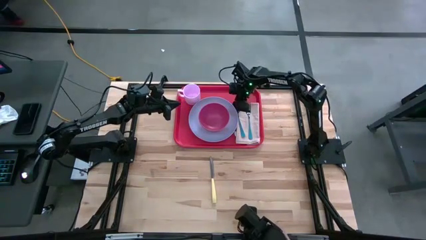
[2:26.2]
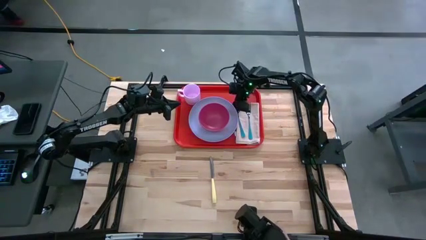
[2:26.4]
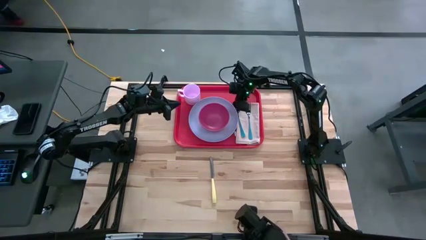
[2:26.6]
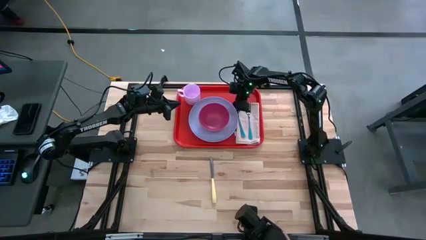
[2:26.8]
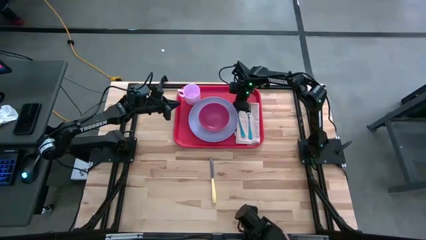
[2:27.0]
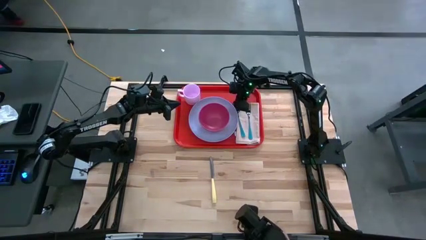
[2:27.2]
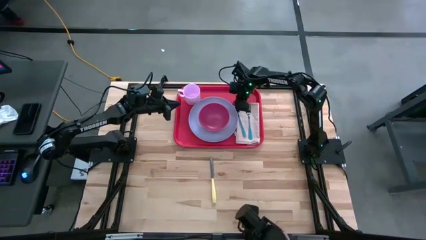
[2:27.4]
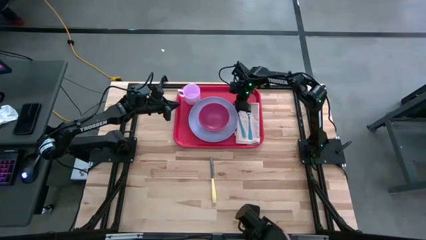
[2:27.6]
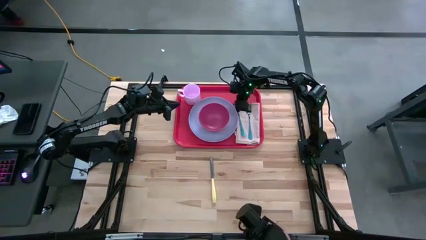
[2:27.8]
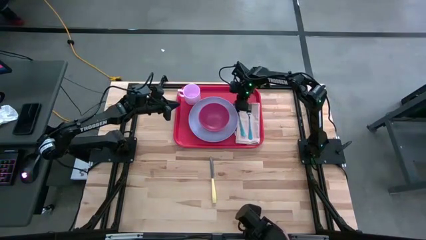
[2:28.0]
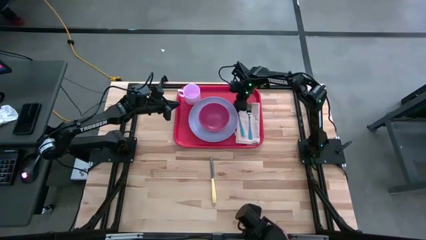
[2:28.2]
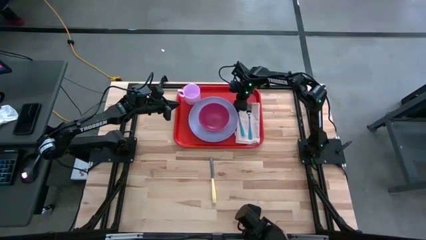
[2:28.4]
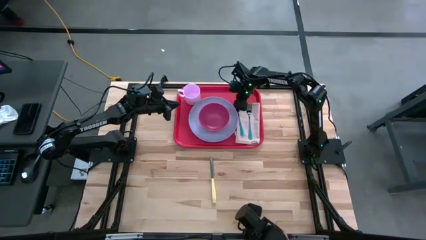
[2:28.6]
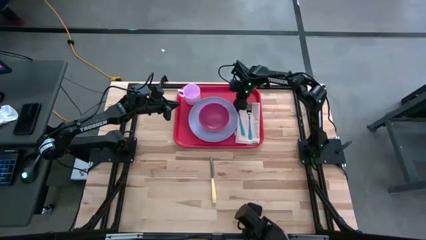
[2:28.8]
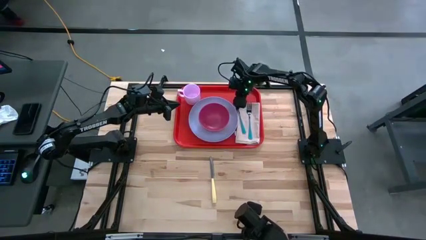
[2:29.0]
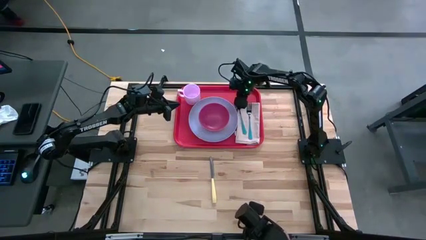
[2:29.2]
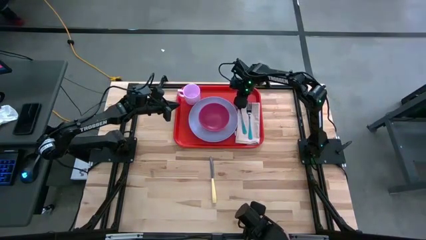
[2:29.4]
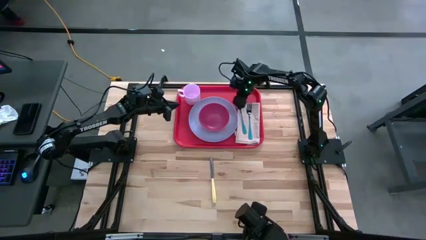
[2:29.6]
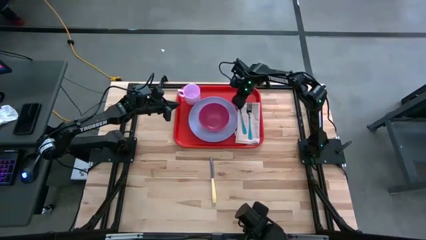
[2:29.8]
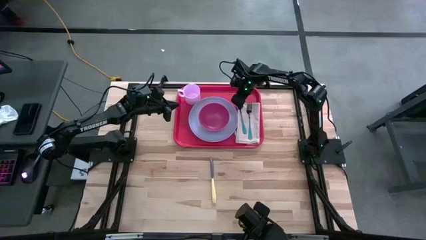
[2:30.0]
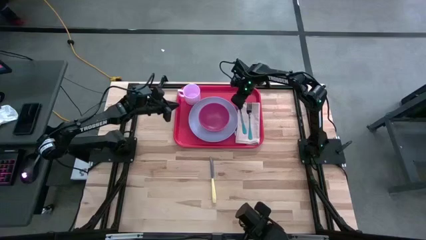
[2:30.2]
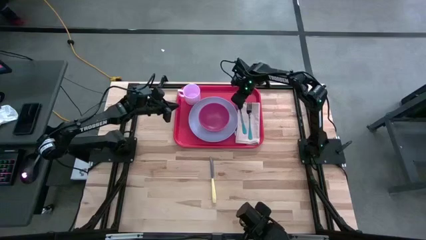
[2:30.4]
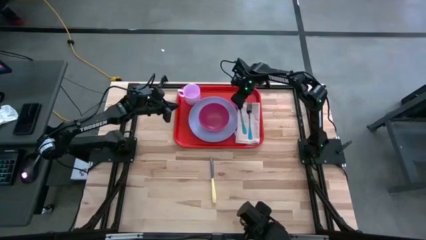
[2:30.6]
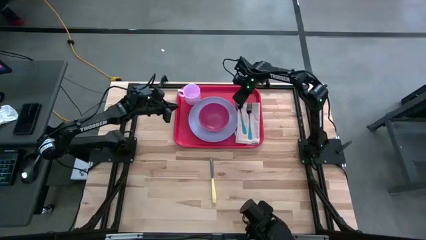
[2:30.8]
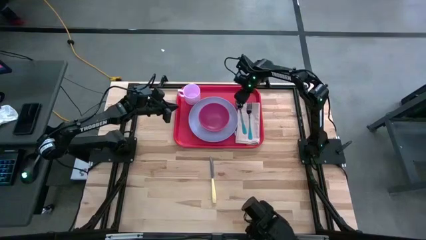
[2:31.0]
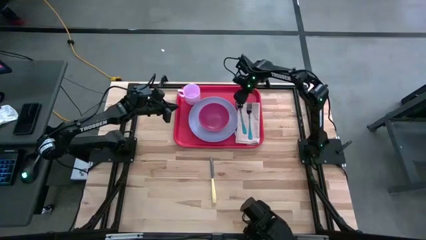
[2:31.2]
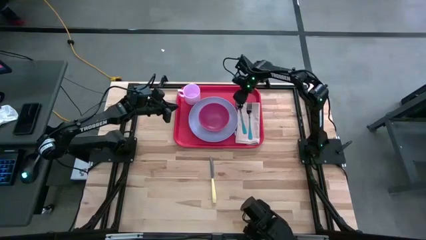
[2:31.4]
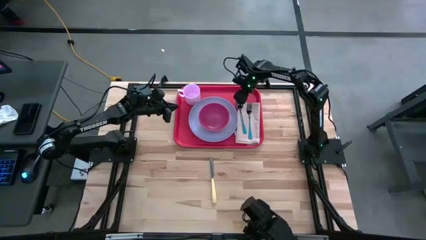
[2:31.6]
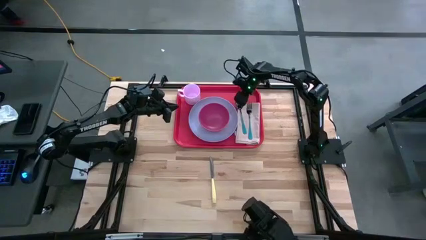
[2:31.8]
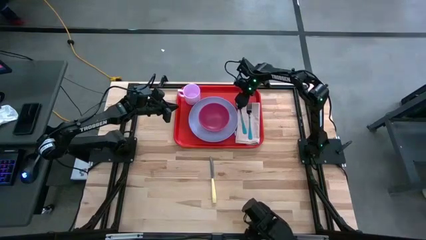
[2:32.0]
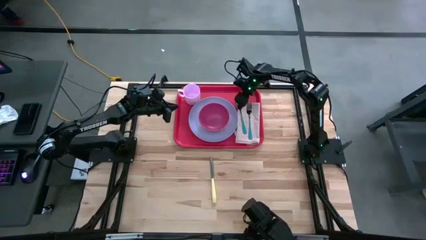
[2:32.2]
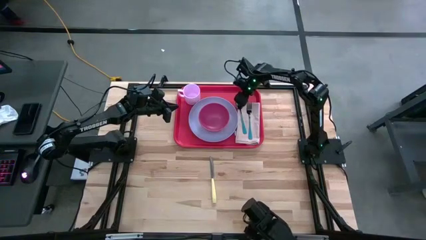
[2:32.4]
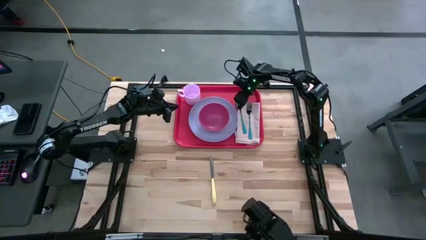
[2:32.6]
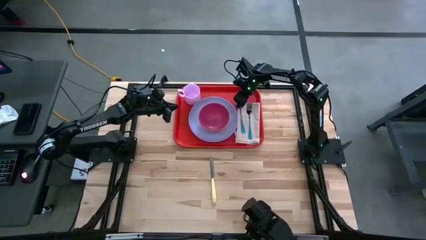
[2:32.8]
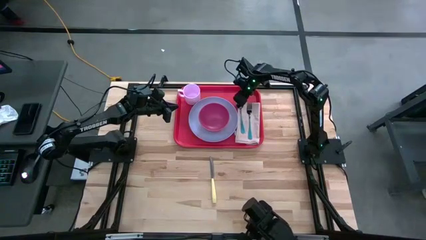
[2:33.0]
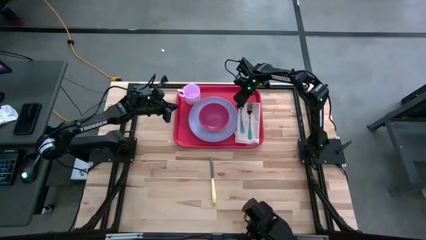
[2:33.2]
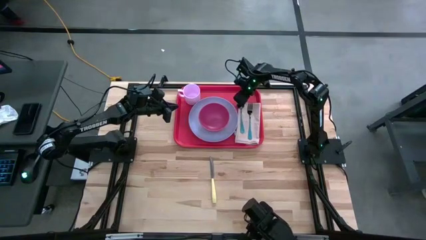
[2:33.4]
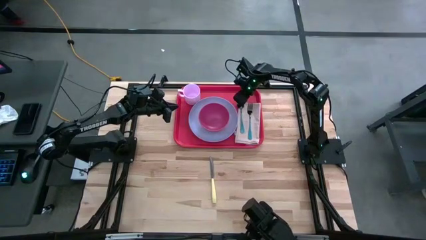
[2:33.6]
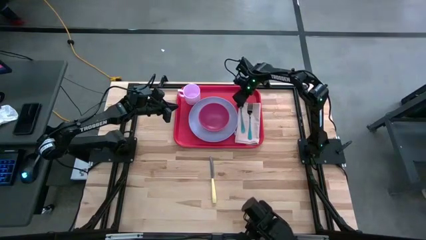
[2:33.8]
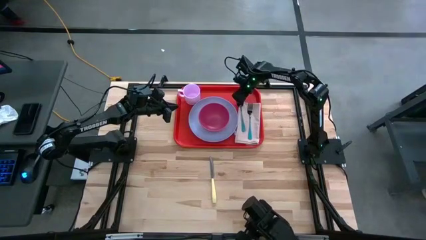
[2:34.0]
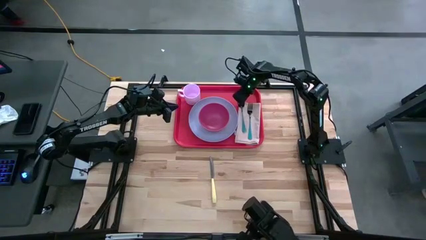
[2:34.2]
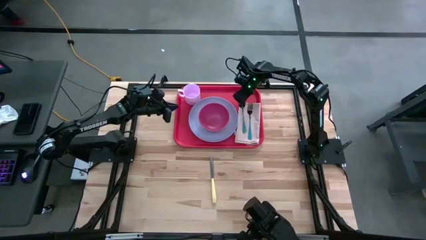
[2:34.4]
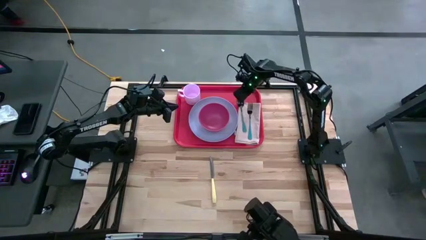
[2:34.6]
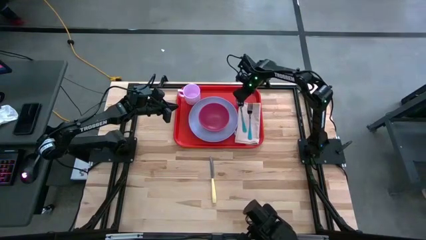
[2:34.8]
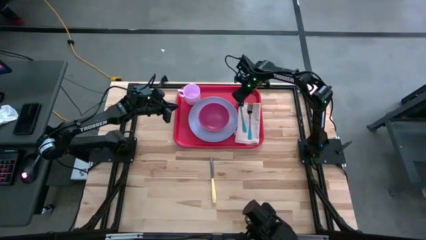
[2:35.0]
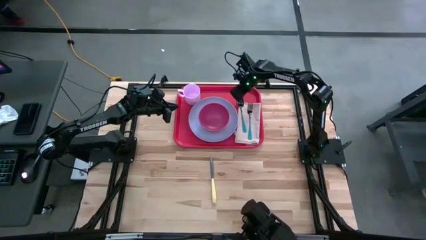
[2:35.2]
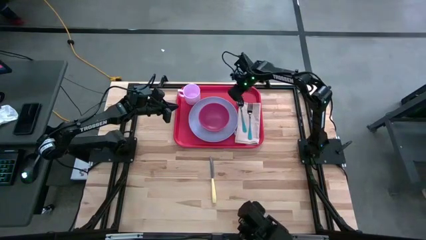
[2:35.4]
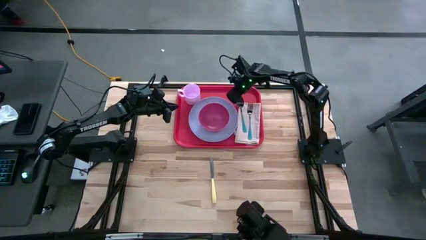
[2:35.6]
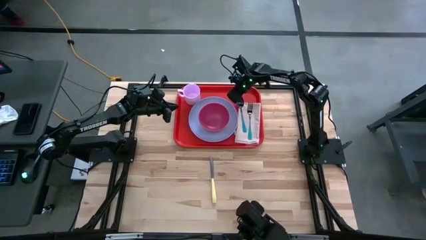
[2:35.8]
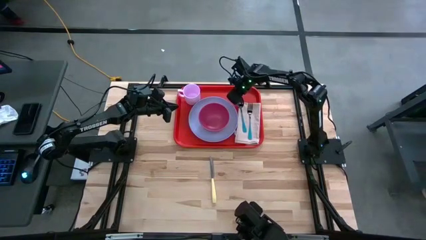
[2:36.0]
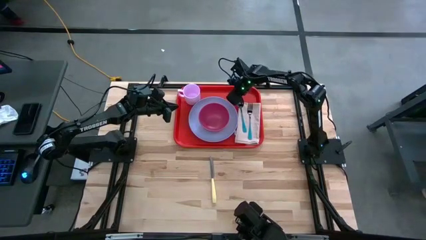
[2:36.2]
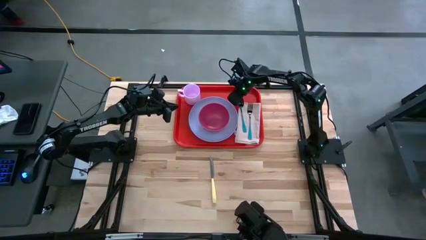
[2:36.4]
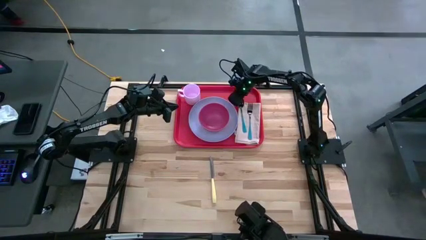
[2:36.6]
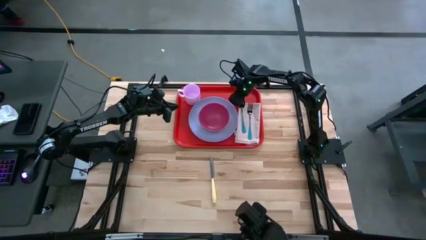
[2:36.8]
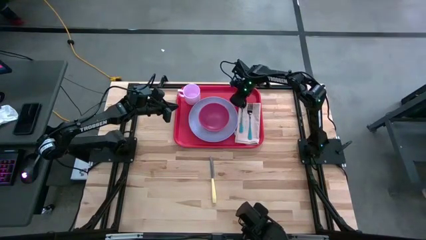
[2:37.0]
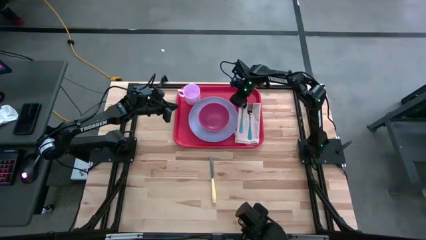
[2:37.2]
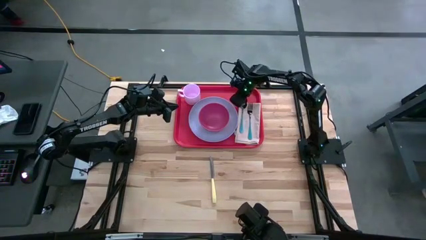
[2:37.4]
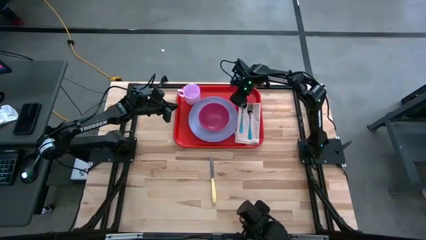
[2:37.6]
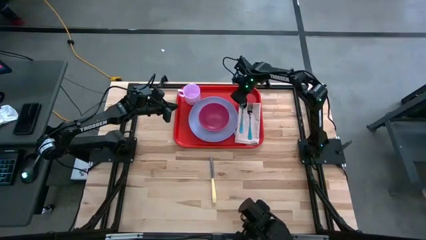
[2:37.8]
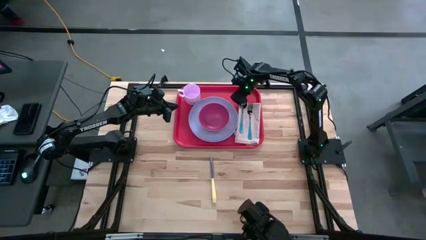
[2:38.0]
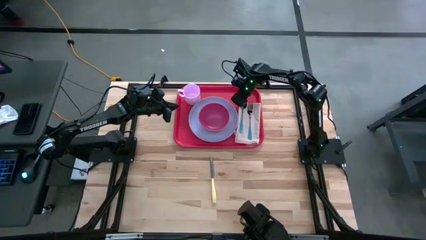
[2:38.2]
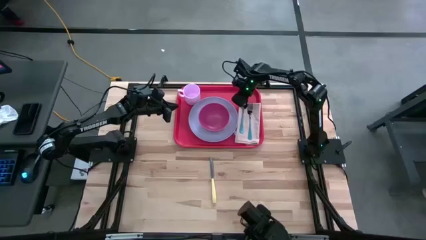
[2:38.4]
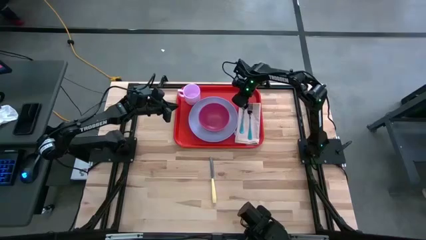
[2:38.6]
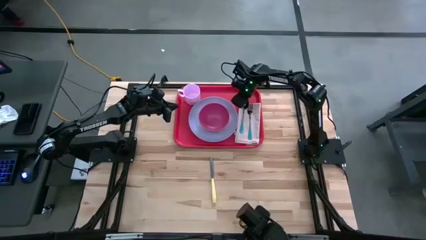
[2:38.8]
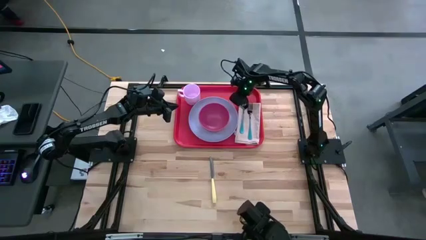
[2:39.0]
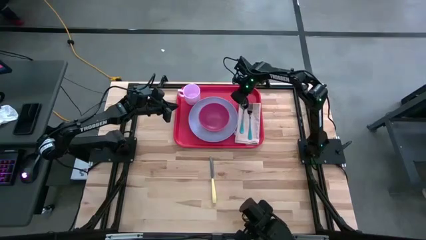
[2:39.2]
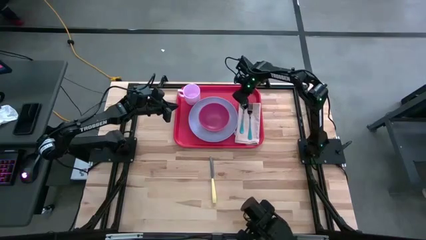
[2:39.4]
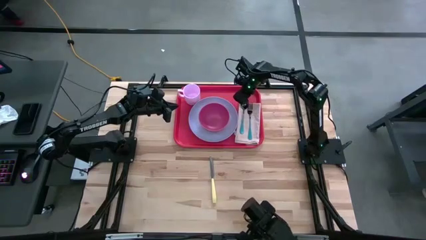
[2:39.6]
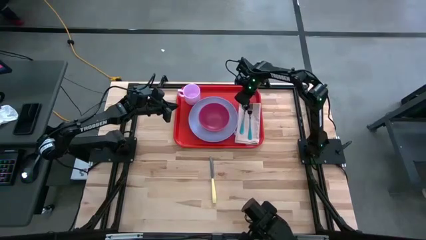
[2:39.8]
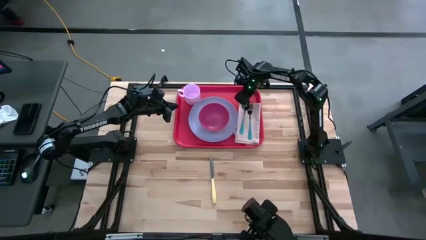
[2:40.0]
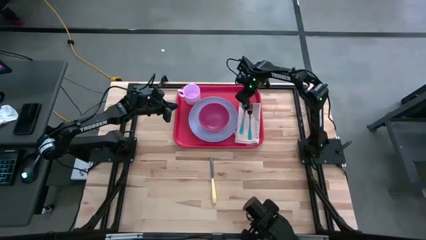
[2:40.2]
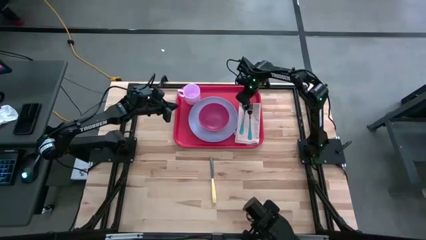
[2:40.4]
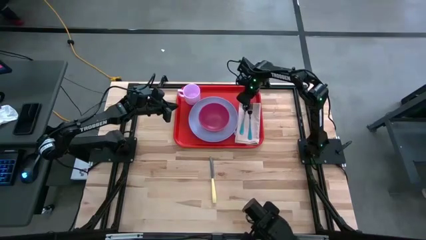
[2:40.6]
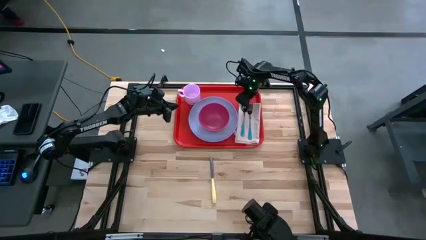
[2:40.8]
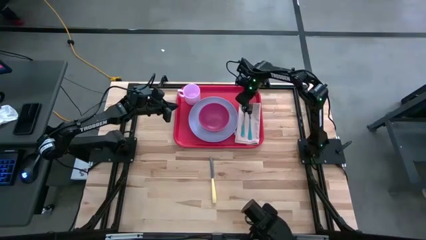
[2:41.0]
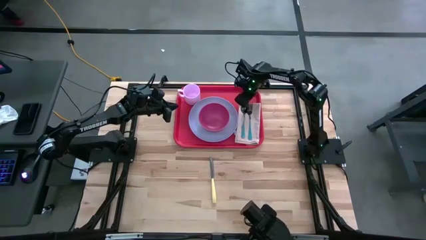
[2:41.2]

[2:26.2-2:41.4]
Task: Set up tray
Put the blue spoon on the white napkin to the left of the blue fork
